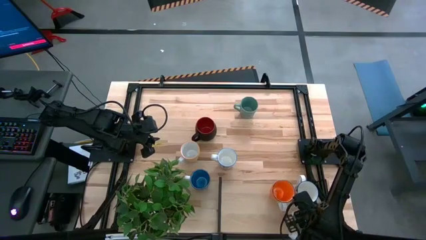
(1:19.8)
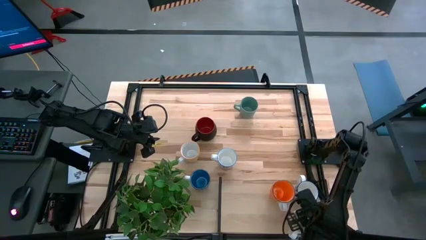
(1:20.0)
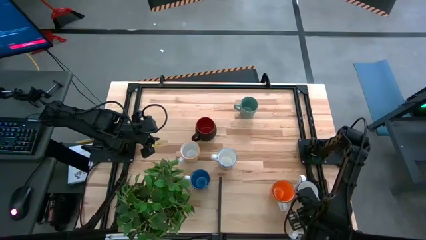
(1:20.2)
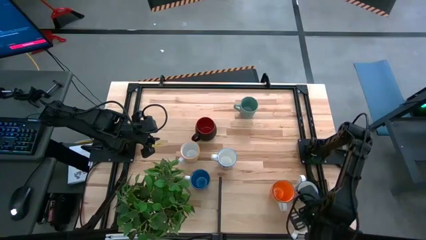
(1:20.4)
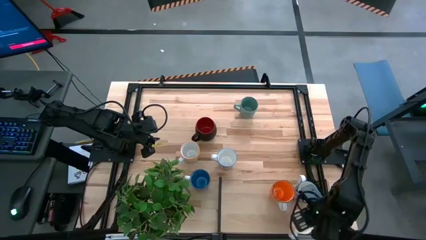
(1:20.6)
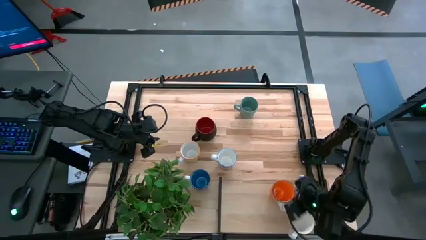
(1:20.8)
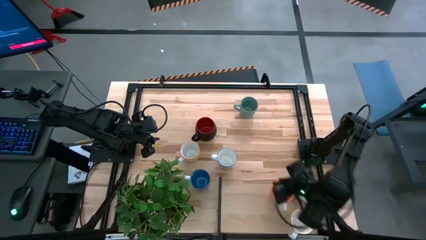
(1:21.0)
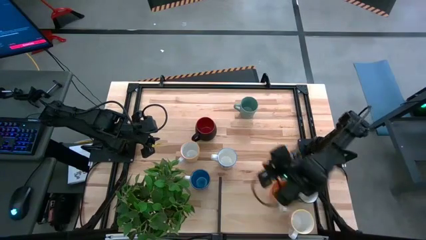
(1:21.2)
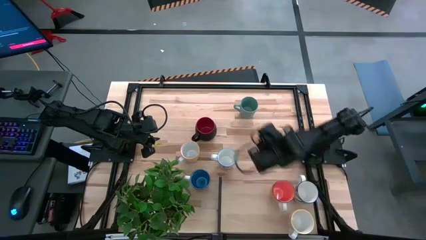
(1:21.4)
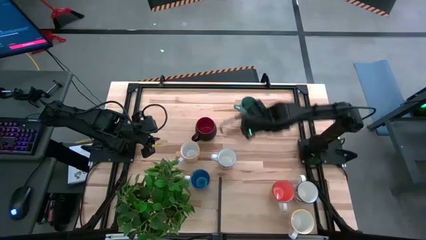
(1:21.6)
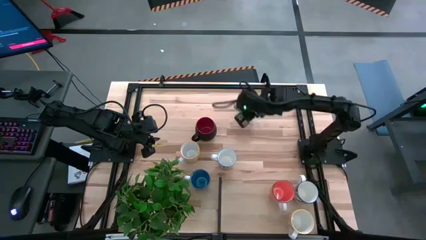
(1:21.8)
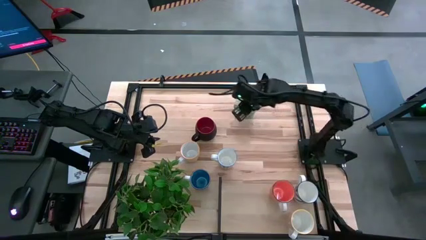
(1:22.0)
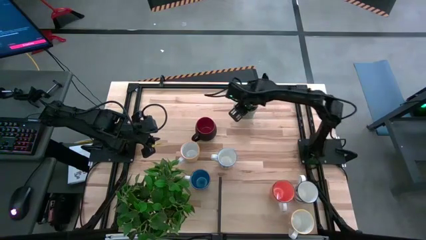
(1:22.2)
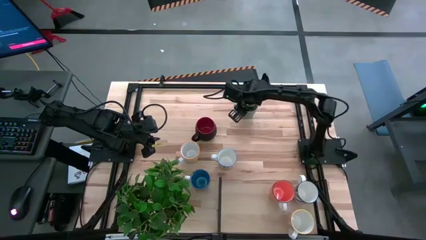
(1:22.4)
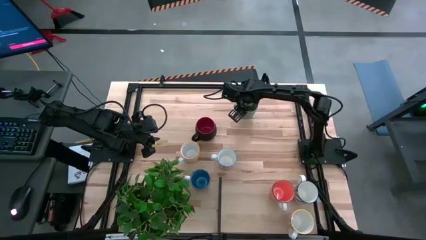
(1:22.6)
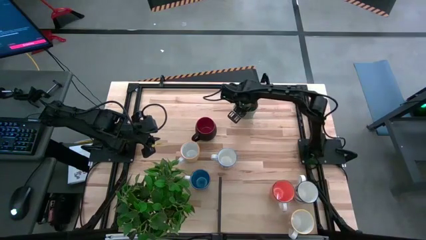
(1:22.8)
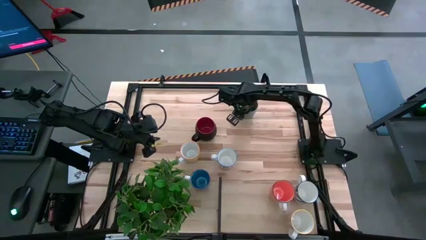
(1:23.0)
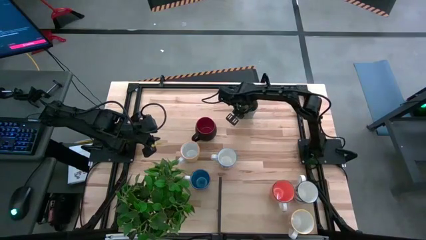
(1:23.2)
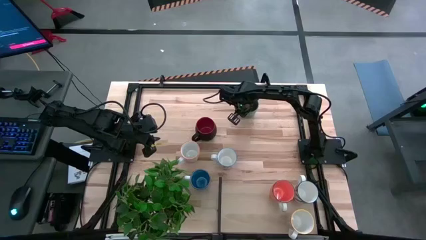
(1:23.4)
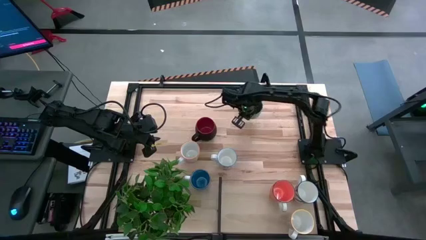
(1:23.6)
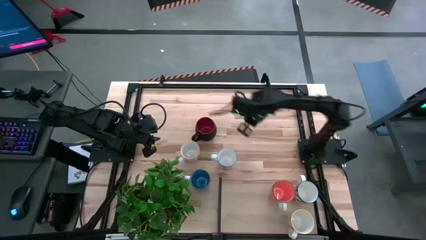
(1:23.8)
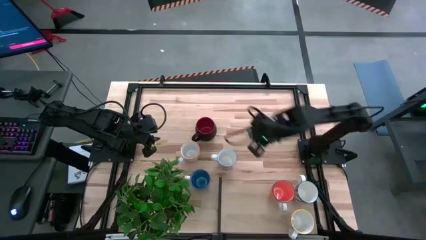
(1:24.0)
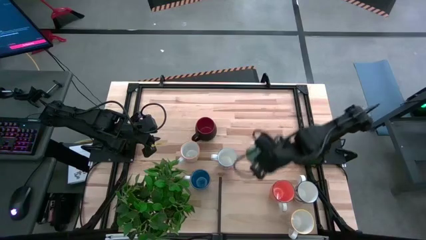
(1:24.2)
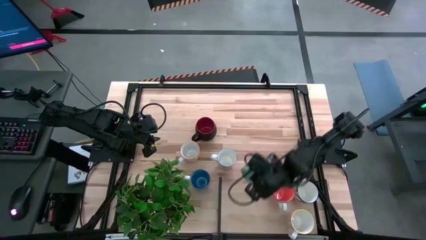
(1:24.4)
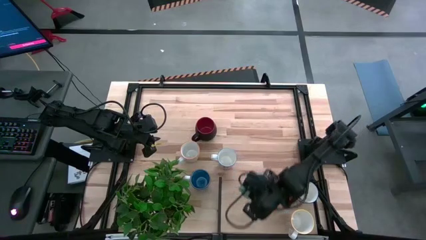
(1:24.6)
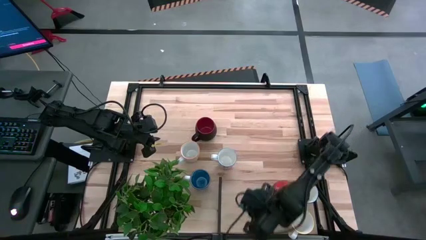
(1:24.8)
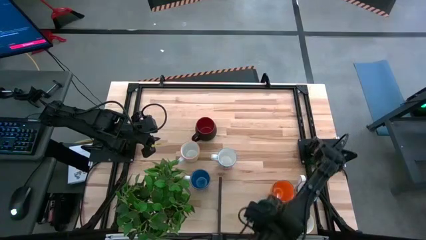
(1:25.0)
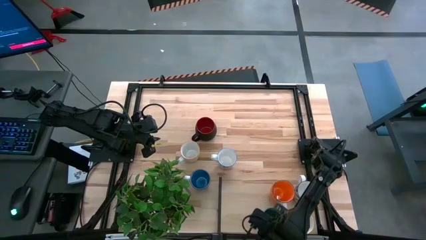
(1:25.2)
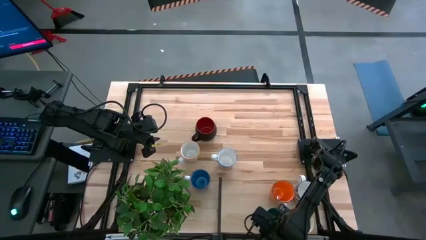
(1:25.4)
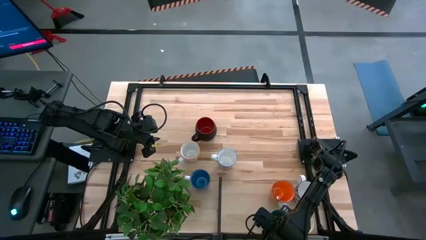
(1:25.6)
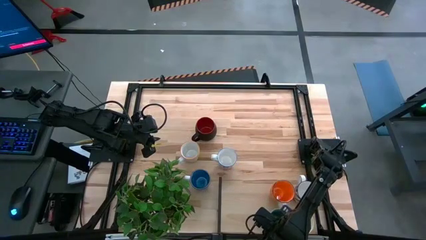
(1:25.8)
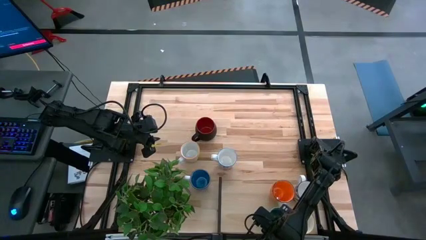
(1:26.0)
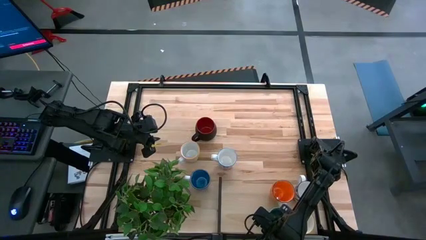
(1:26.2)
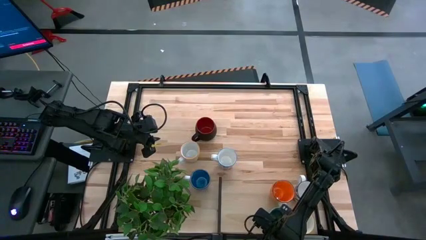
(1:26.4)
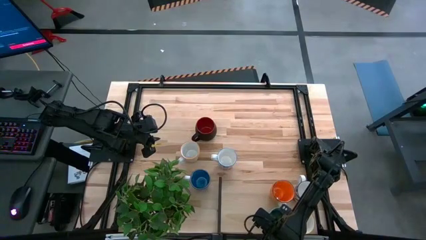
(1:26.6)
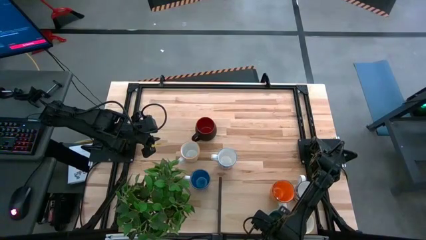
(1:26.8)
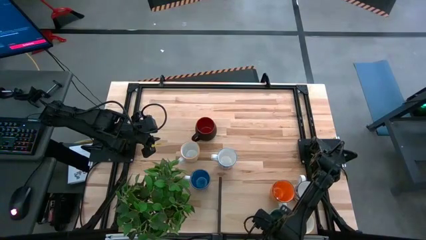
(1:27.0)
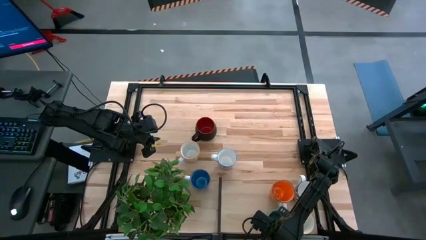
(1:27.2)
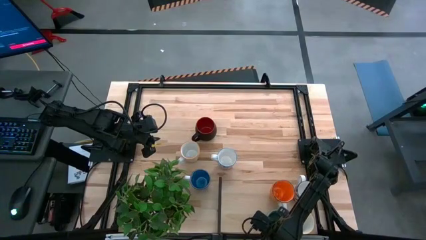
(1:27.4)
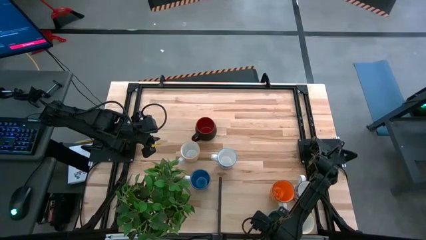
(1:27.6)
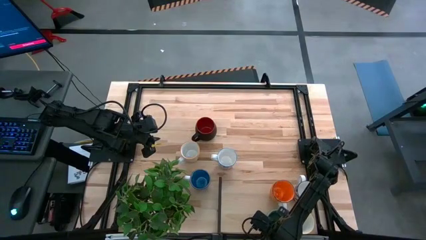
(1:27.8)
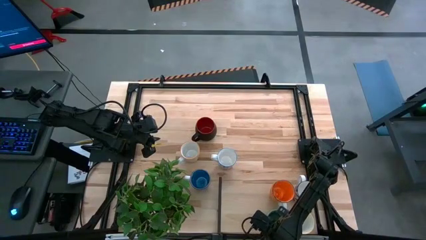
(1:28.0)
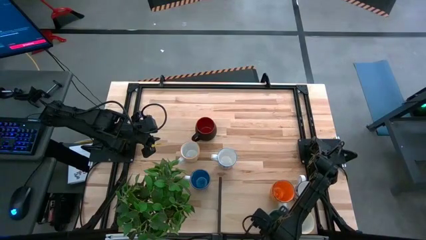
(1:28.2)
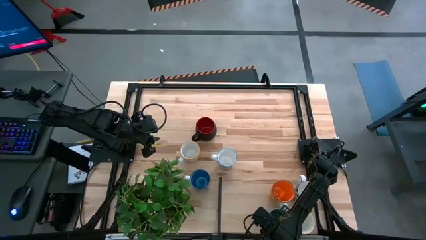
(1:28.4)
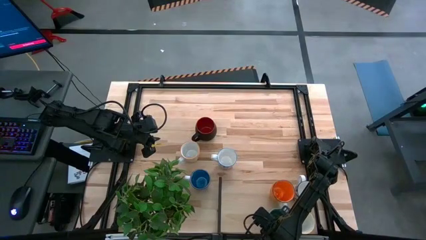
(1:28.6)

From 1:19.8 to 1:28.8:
Task: Place coffee mugs
Put the green mug on the shelf

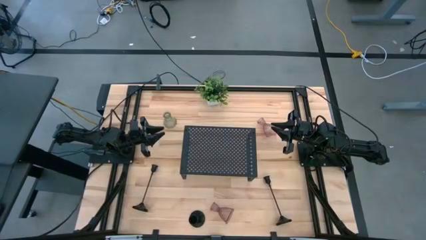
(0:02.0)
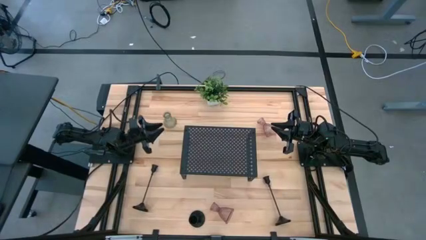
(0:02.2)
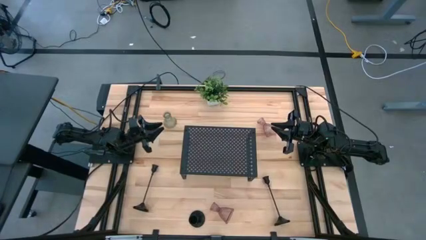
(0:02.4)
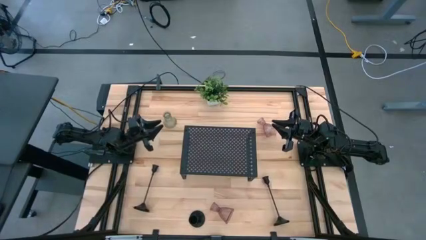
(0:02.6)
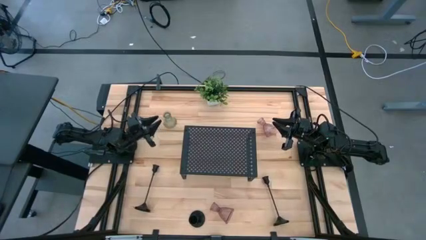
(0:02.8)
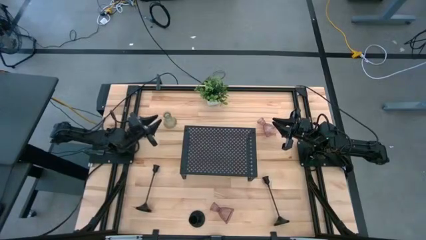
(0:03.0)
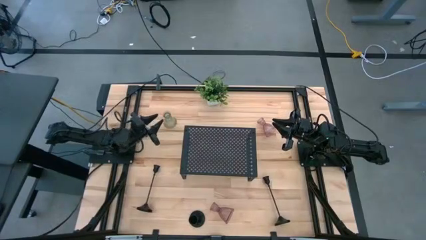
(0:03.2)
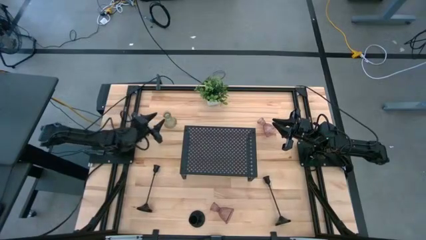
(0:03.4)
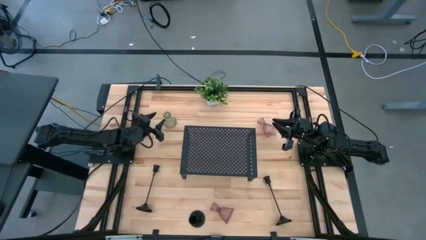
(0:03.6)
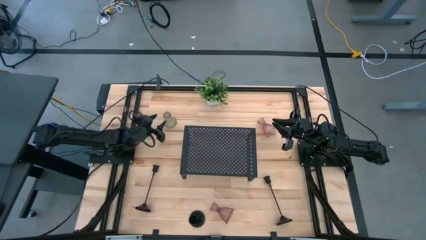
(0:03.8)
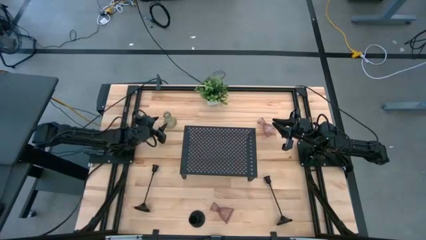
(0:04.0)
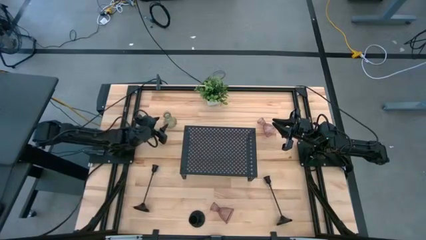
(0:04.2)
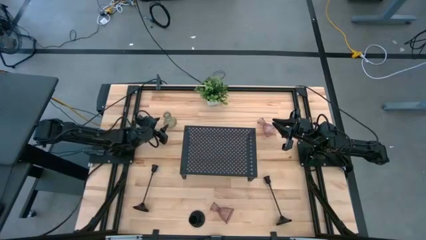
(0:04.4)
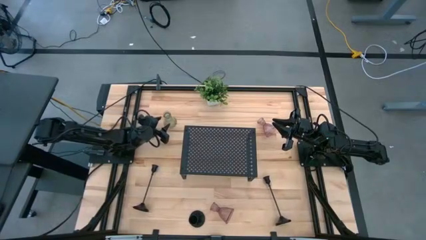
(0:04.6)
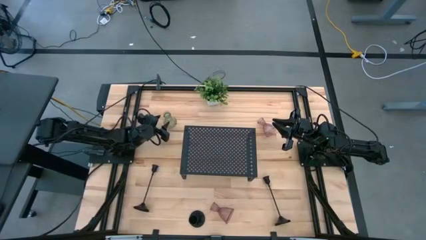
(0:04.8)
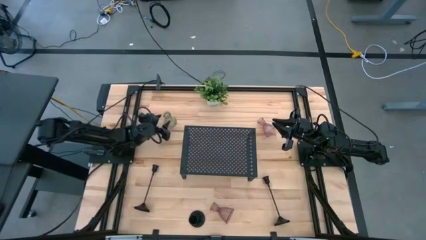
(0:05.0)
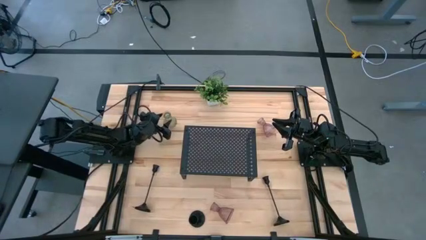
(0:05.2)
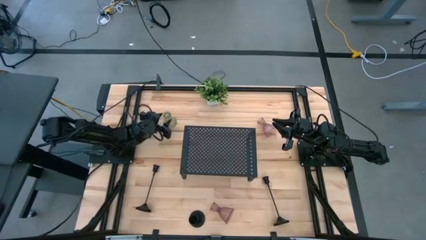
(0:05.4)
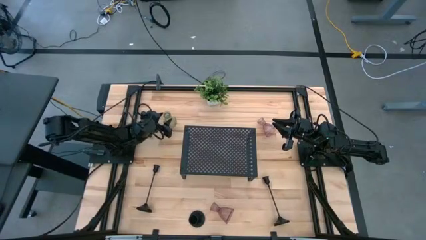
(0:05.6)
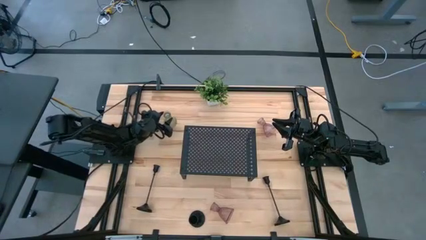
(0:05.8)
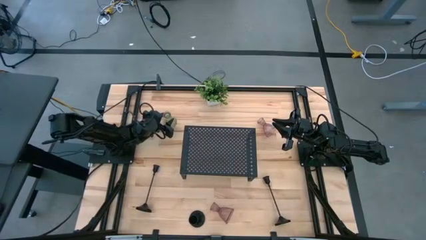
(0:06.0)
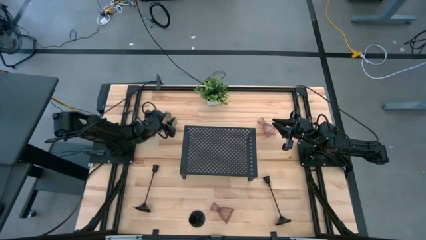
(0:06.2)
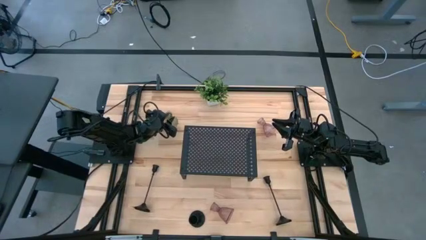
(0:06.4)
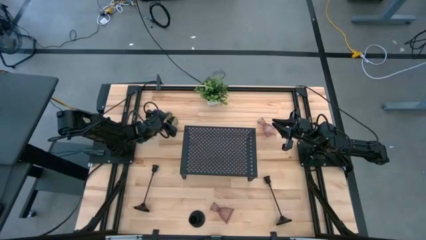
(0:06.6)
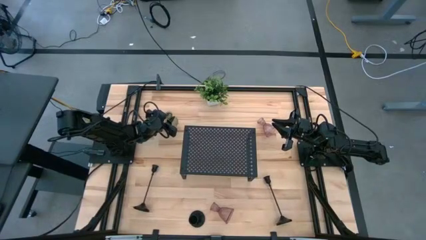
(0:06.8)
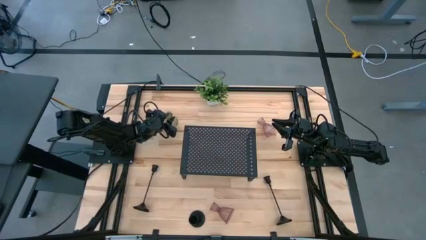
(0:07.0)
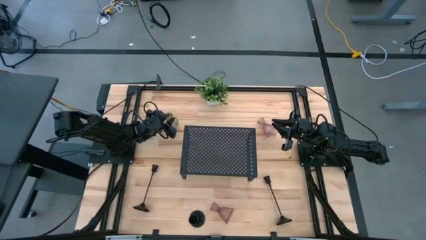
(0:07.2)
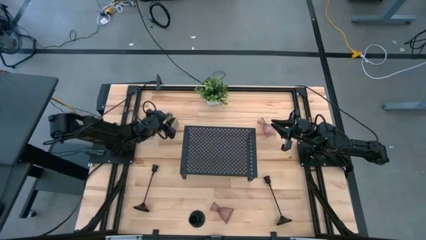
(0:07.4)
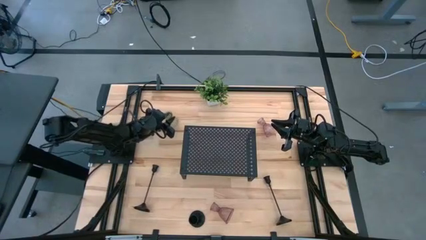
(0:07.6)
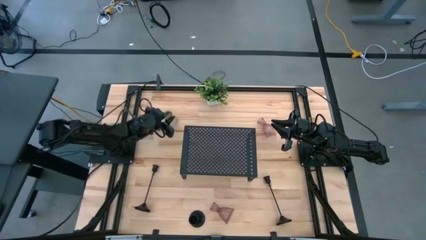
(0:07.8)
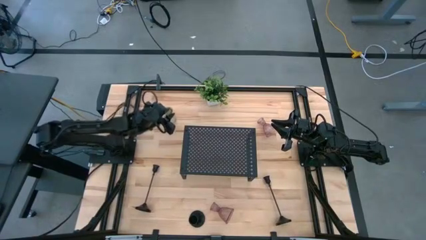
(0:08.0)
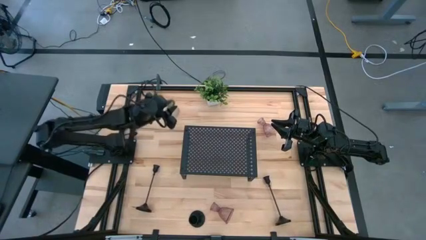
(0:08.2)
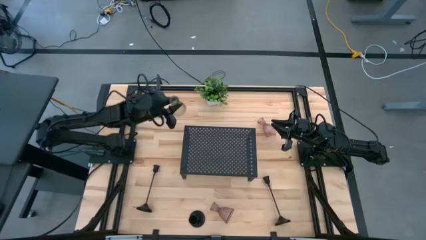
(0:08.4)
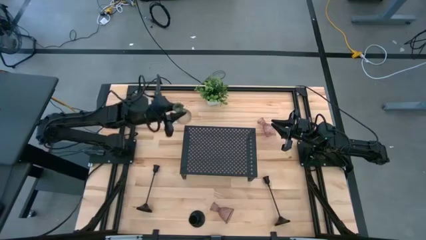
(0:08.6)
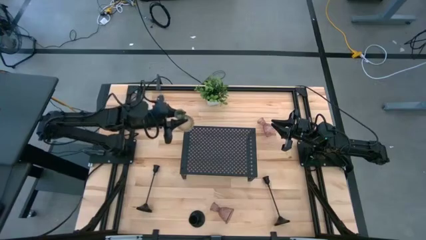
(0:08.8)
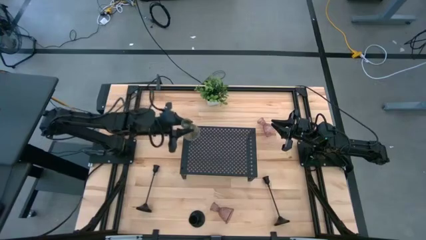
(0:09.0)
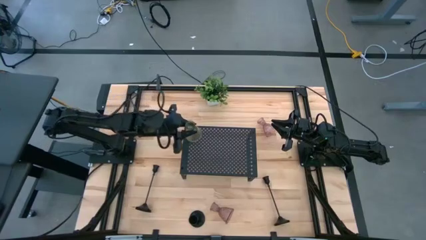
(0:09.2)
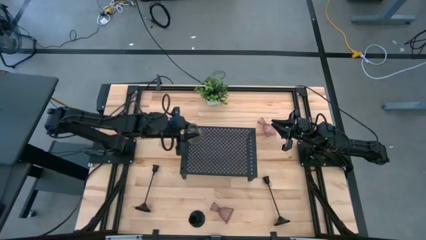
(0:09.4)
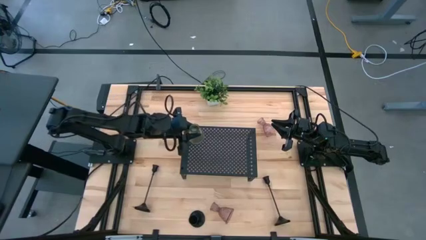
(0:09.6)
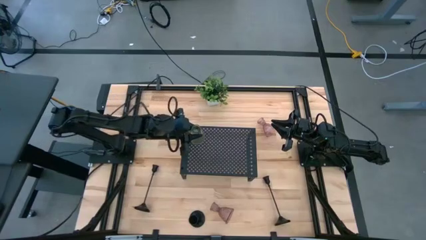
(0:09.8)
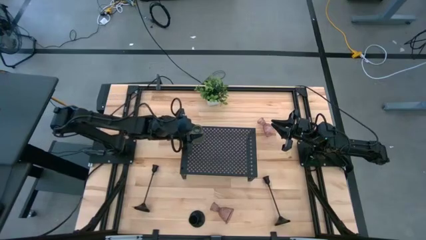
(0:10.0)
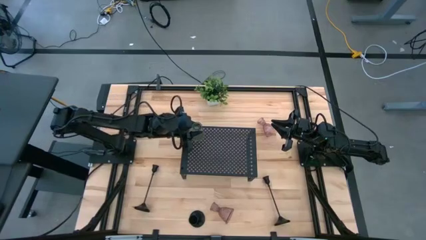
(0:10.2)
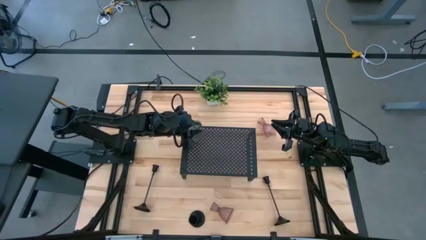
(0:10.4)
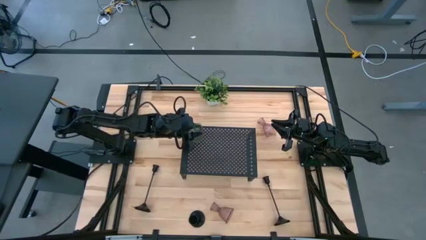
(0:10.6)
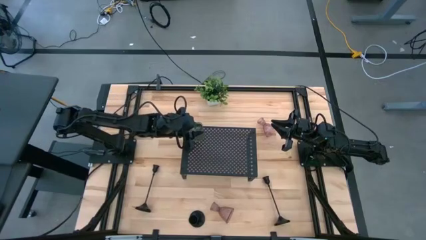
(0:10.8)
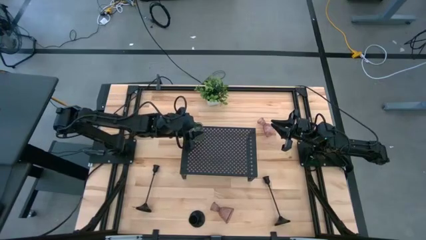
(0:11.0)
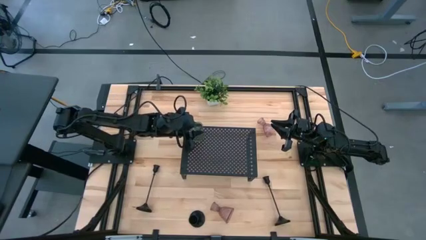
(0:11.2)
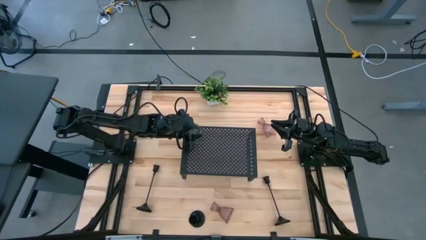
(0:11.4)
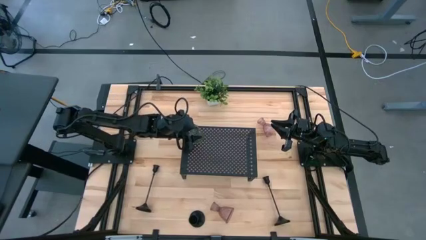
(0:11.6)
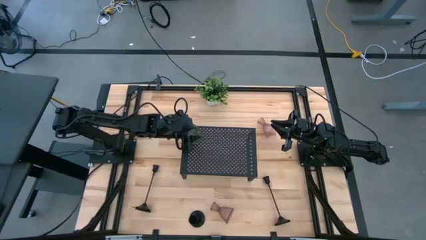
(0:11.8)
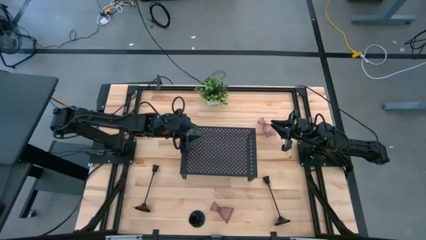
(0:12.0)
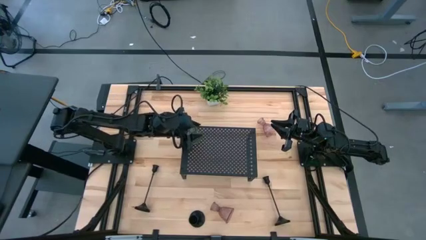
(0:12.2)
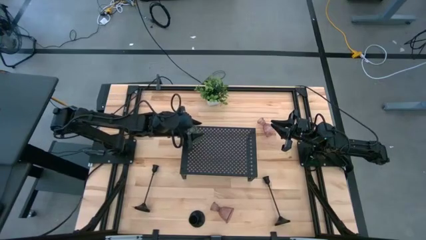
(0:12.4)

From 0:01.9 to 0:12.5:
Task: Pick & Place candle stick holders
Put the transparent glass candle holder on the shelf
